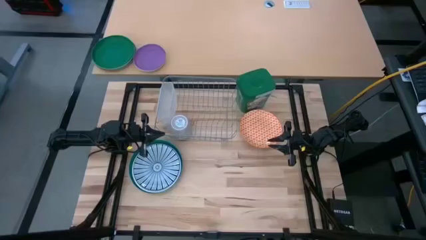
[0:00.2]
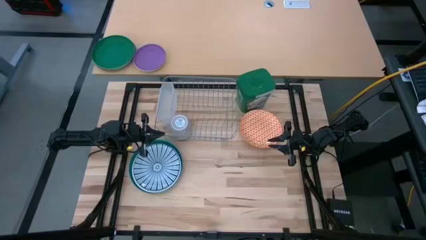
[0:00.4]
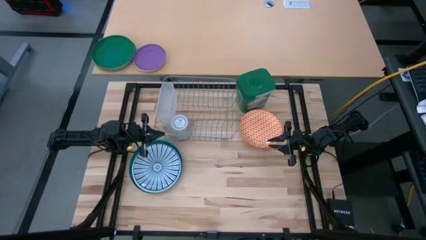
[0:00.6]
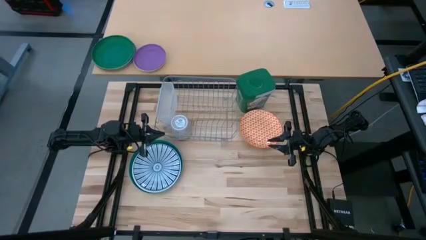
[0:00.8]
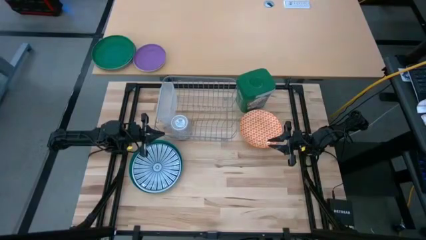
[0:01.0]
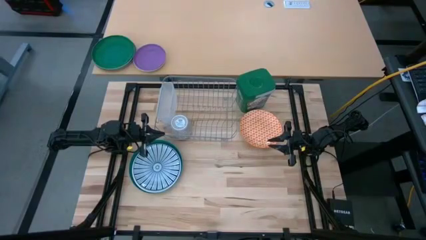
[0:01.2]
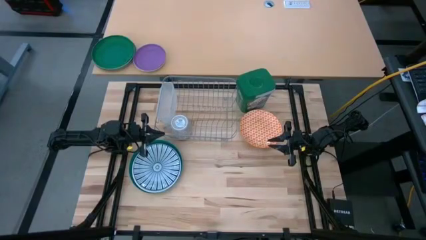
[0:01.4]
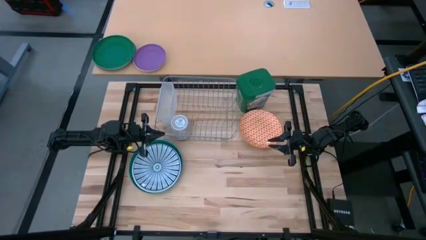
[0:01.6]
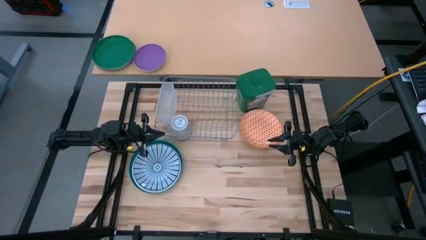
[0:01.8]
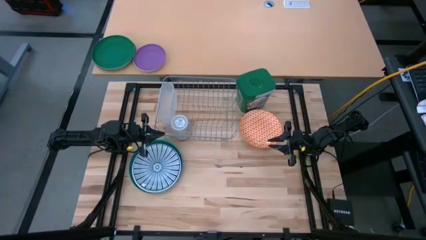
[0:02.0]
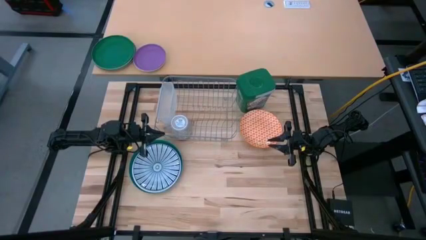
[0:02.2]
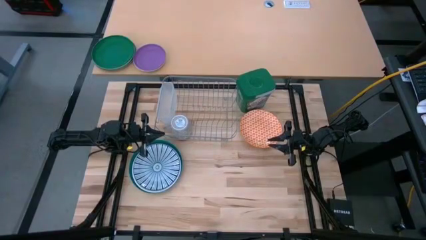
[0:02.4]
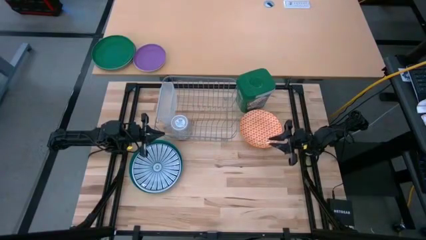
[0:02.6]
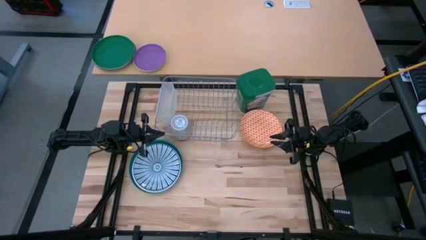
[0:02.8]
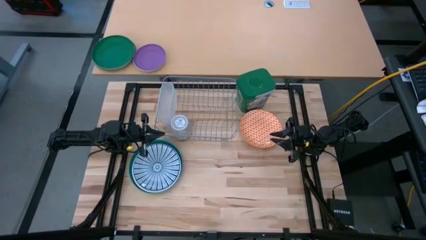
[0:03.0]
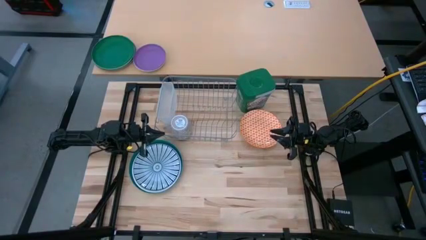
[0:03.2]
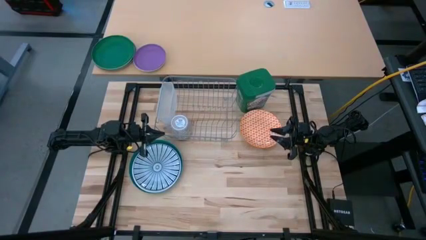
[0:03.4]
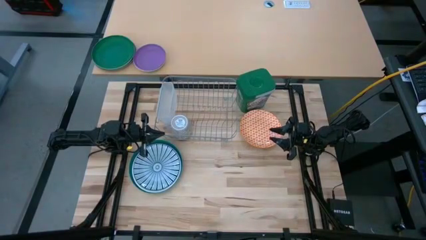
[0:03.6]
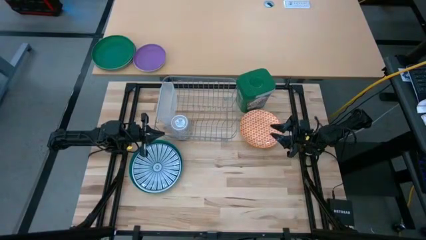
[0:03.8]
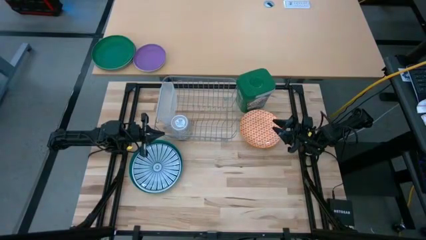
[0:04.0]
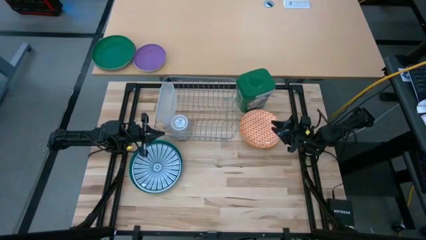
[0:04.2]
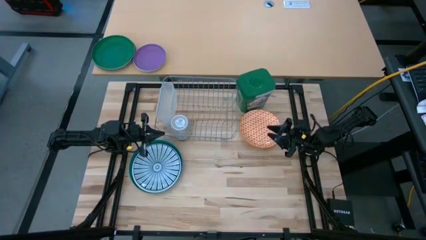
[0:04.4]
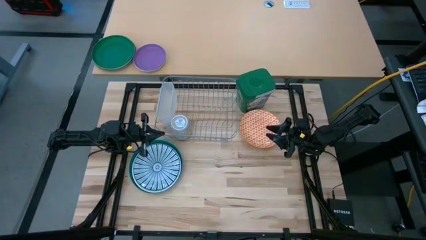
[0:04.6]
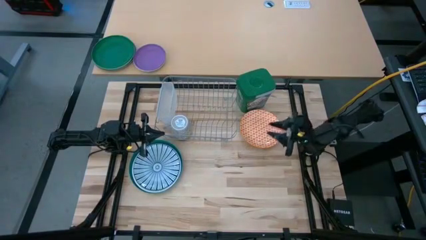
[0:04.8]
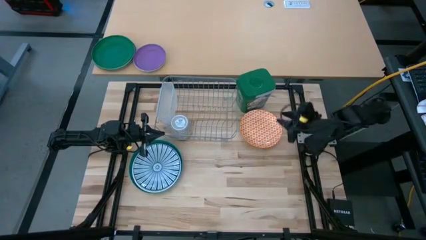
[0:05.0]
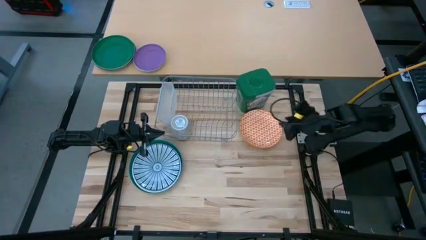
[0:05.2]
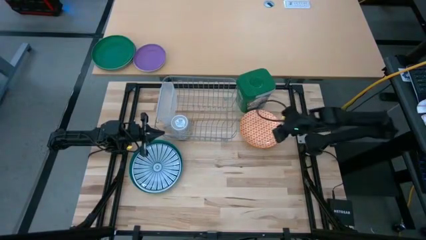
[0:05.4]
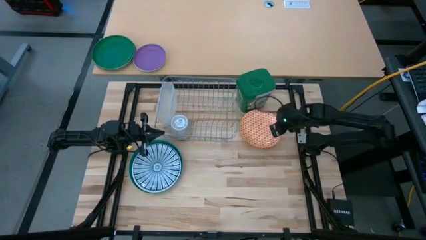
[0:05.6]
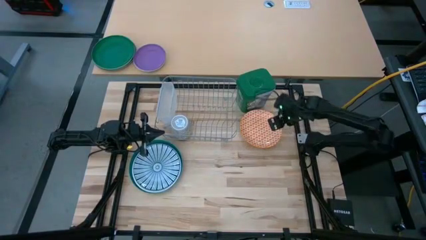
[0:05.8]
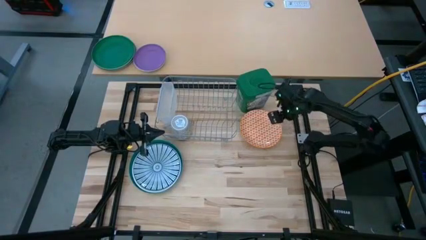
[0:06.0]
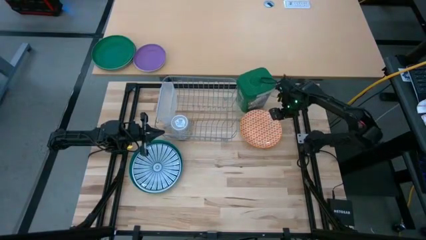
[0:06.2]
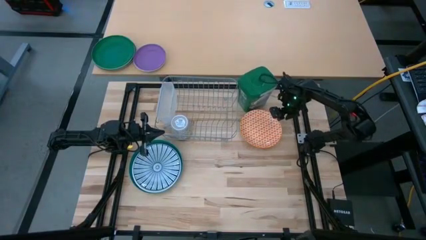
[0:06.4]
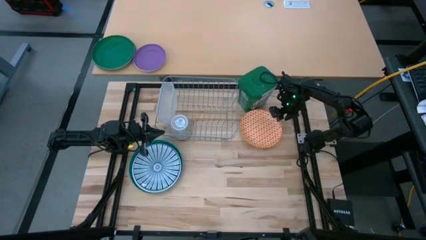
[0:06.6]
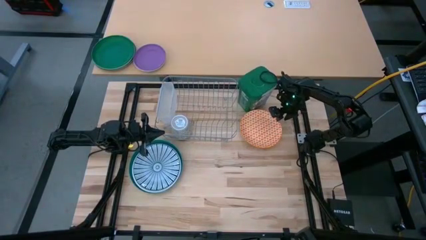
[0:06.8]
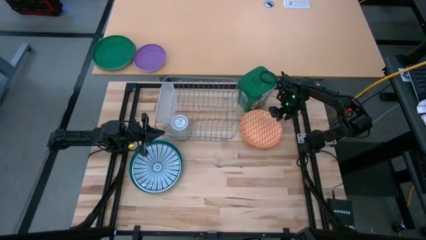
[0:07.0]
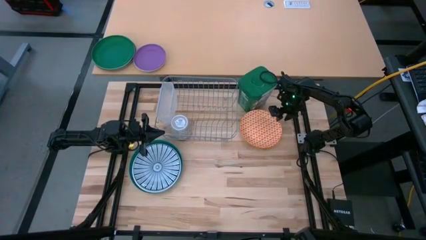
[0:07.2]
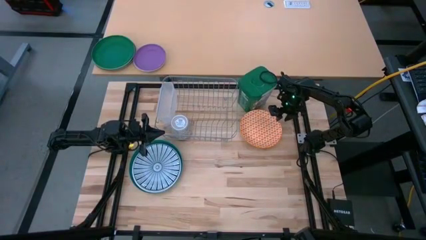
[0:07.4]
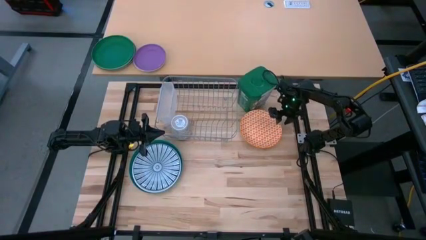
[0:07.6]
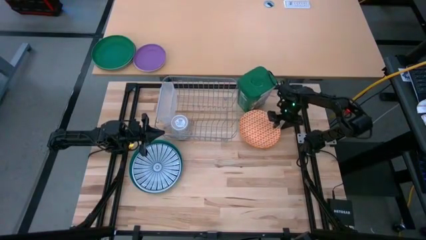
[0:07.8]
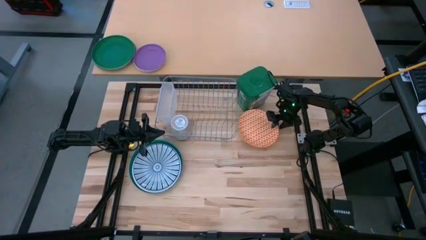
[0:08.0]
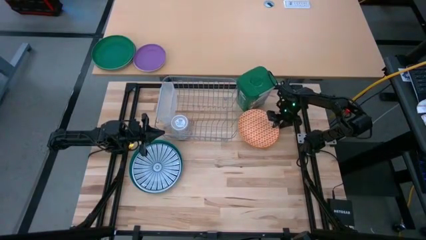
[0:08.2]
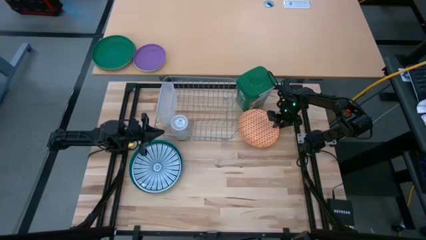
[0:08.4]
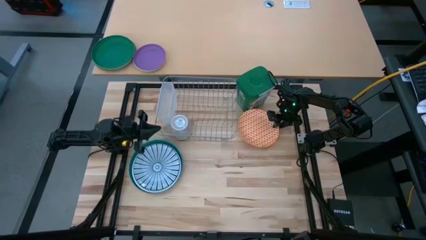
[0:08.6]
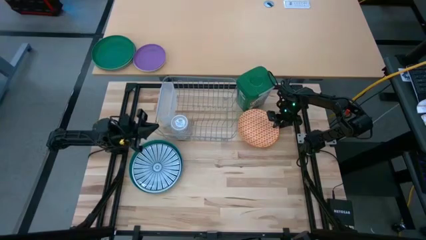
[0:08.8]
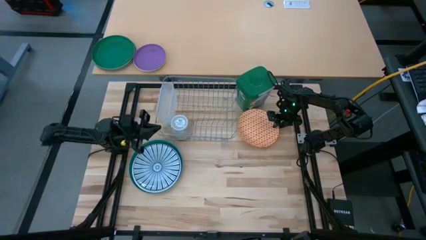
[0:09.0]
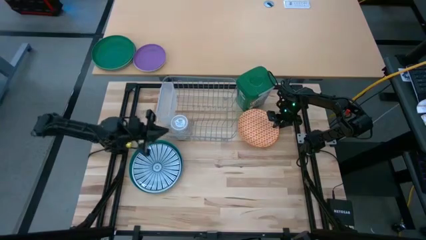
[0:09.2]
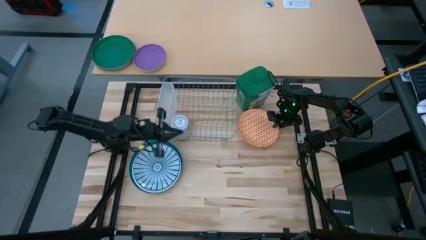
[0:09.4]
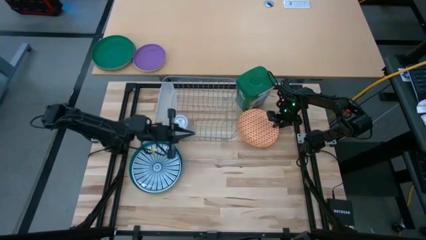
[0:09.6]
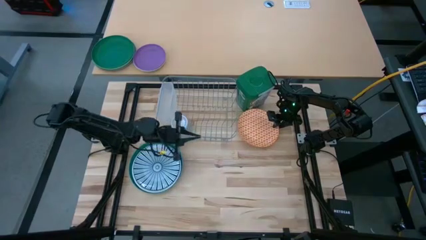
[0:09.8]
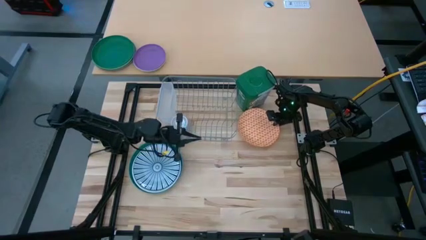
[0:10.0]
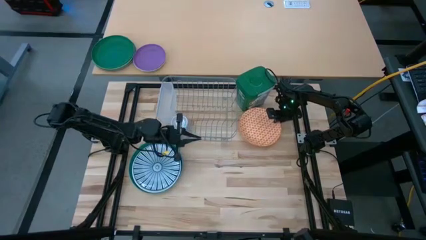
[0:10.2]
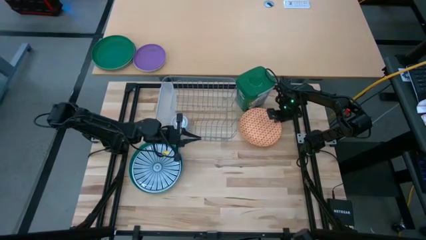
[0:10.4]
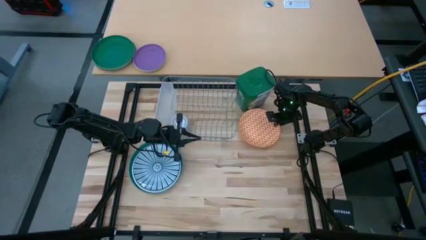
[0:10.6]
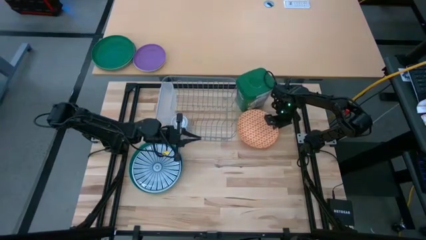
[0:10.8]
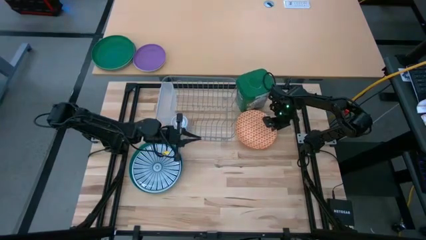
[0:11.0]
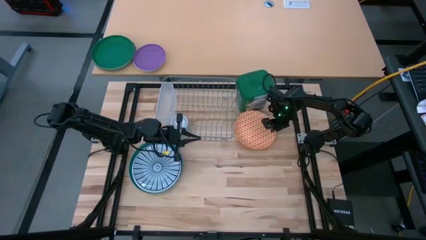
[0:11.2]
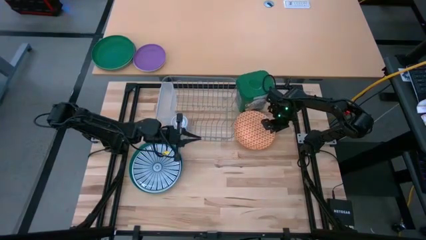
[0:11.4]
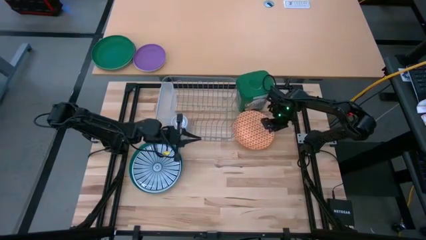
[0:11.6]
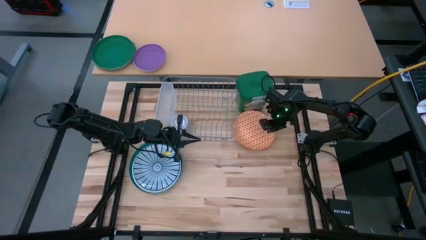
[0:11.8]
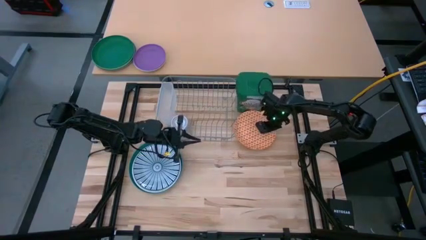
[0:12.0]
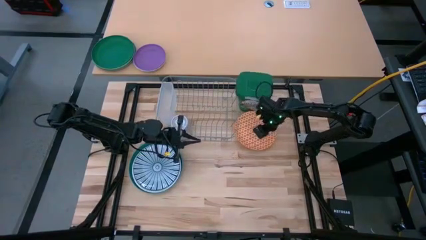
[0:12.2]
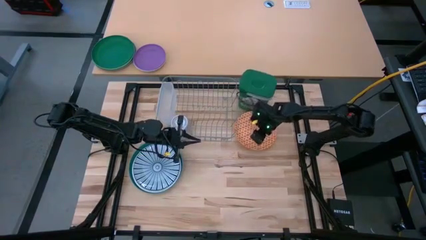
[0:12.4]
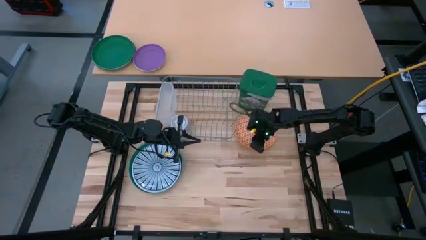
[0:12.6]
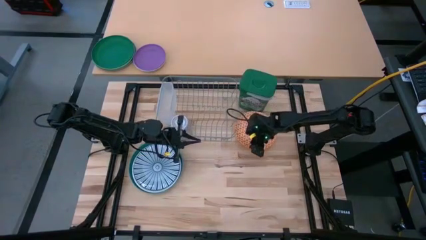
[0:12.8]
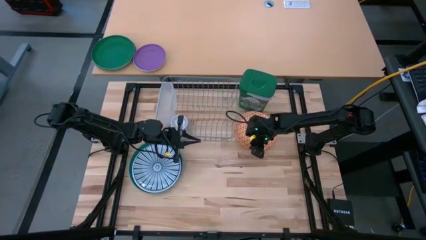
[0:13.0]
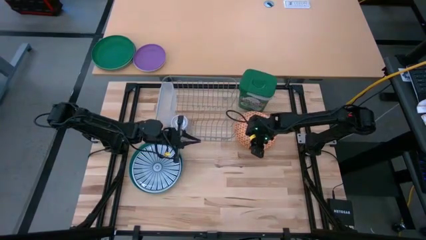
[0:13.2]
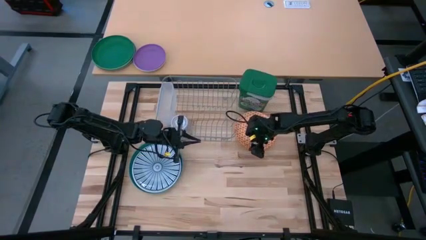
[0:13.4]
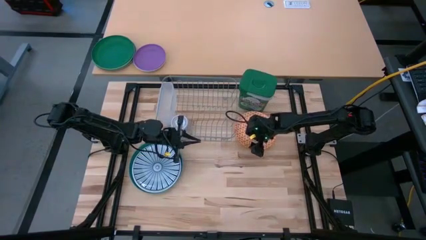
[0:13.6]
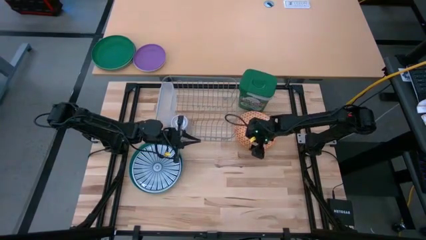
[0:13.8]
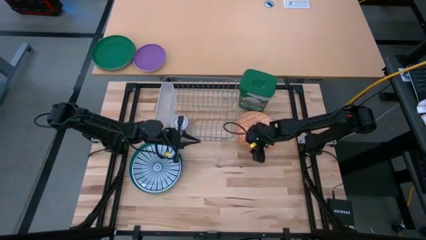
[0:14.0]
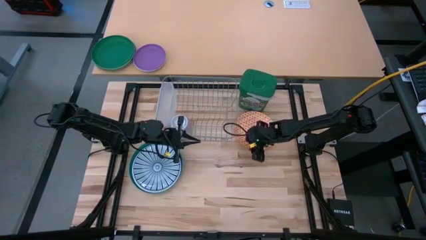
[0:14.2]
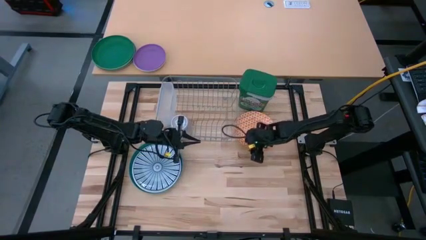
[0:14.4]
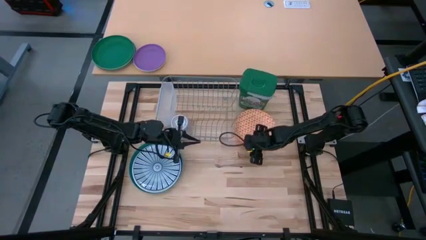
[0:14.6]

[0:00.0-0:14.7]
Task: Sort dishes
Put the orange plate in the dish rack
